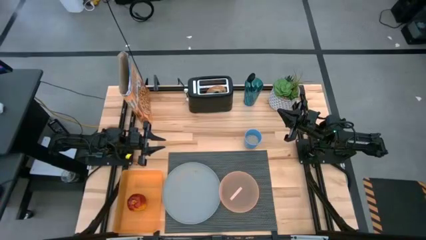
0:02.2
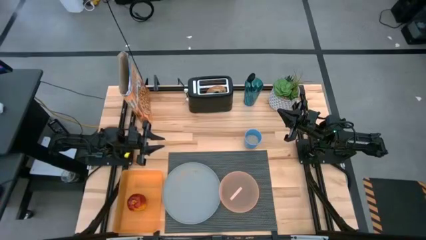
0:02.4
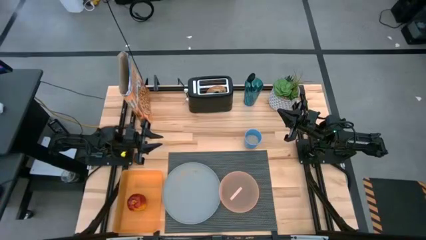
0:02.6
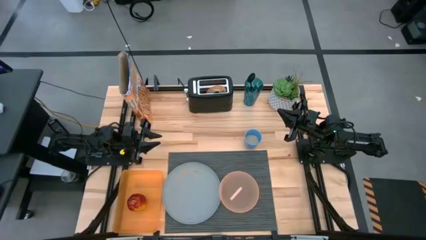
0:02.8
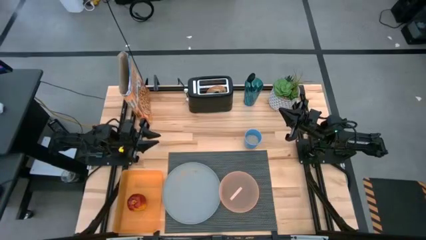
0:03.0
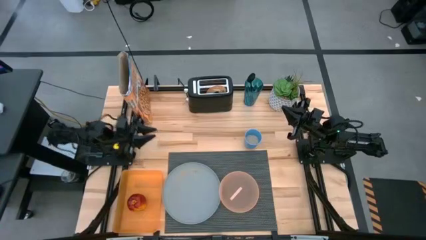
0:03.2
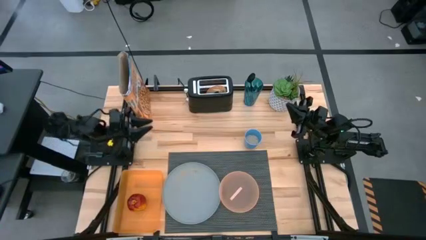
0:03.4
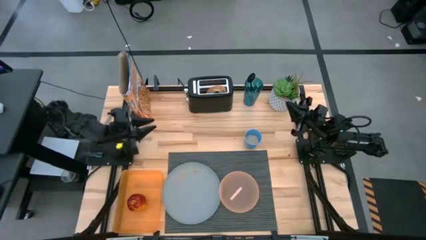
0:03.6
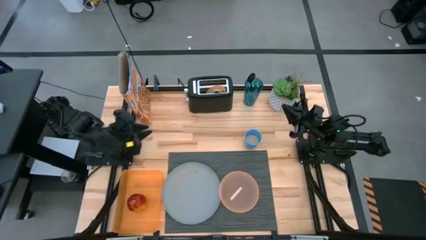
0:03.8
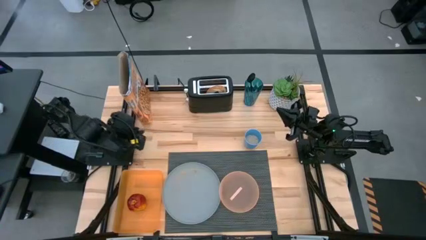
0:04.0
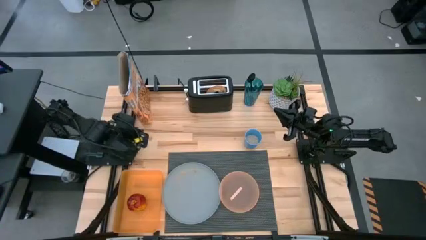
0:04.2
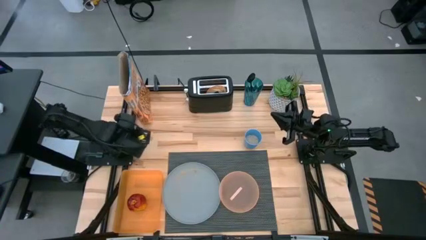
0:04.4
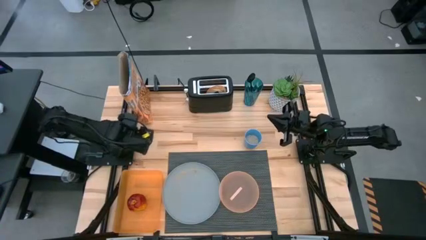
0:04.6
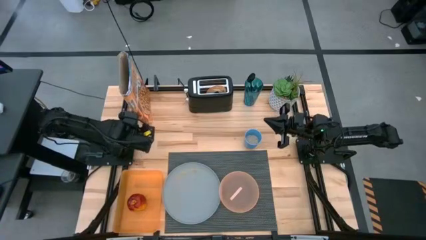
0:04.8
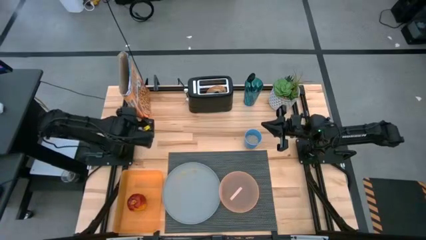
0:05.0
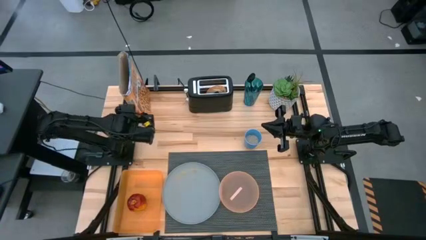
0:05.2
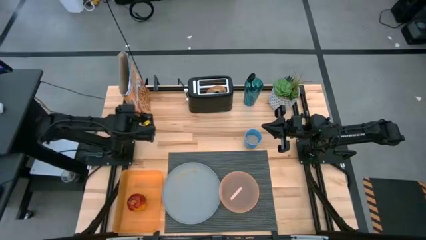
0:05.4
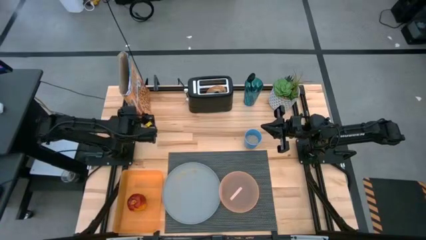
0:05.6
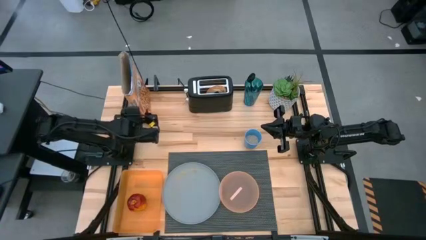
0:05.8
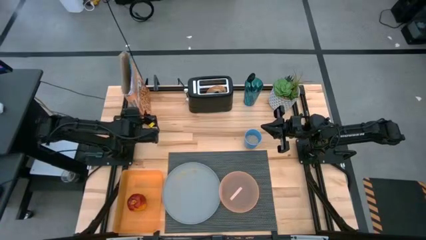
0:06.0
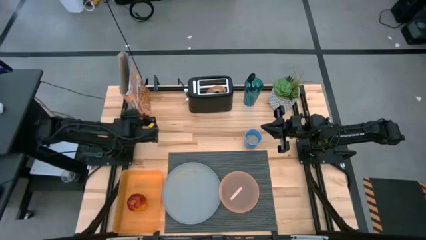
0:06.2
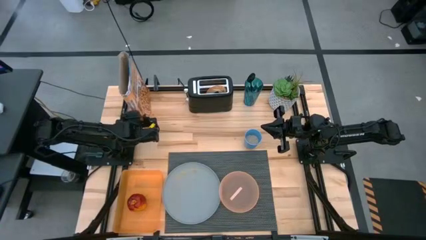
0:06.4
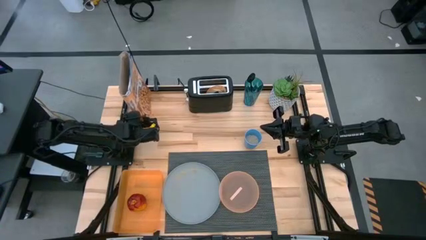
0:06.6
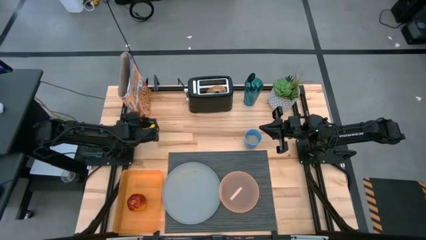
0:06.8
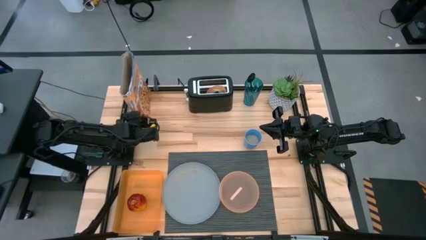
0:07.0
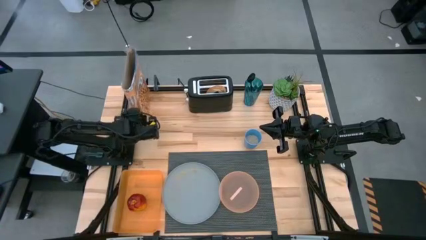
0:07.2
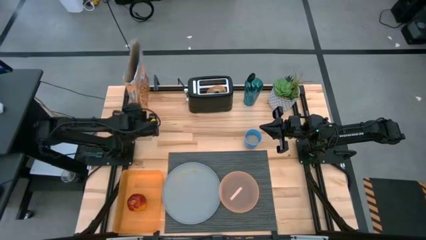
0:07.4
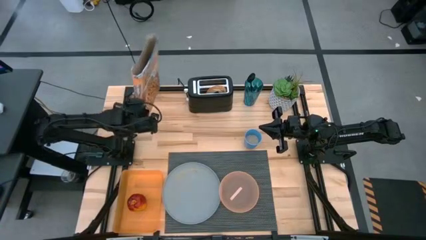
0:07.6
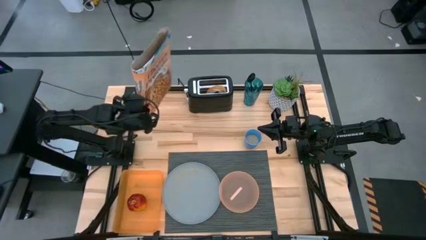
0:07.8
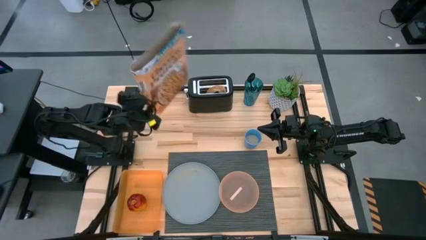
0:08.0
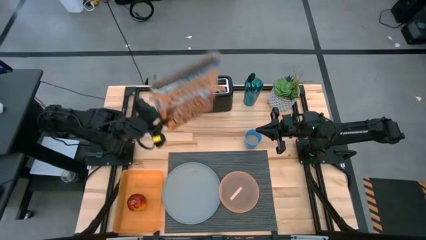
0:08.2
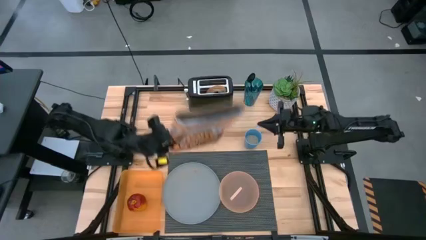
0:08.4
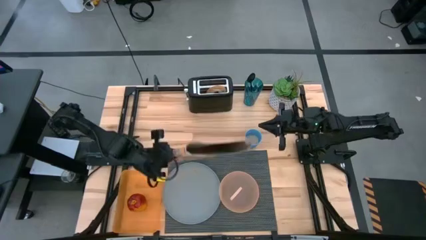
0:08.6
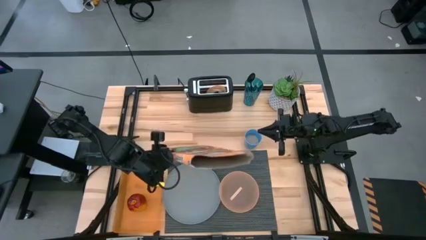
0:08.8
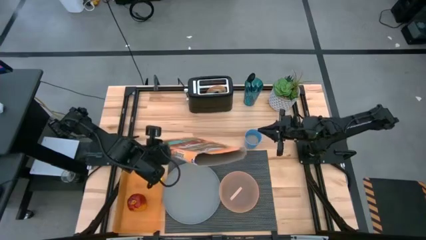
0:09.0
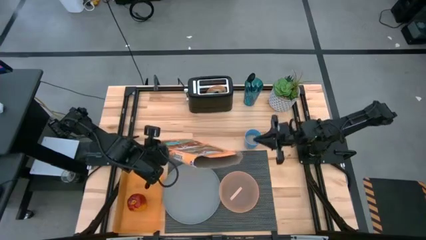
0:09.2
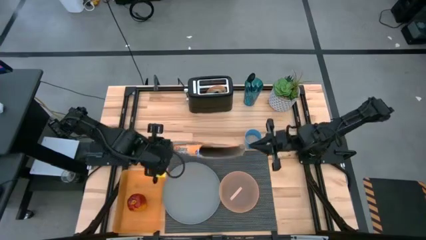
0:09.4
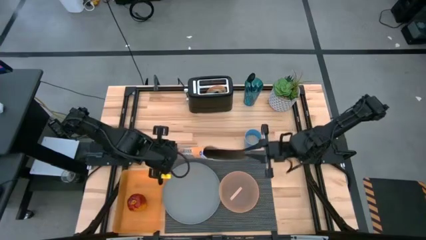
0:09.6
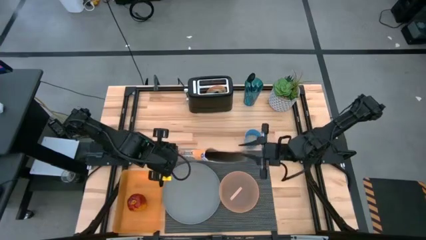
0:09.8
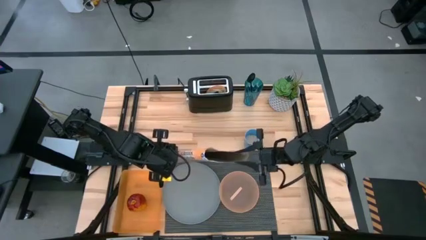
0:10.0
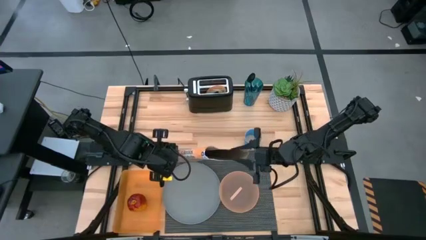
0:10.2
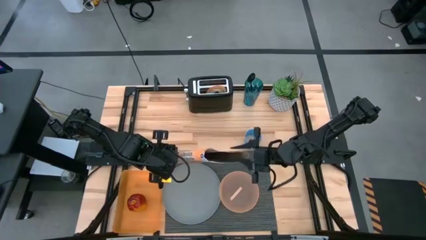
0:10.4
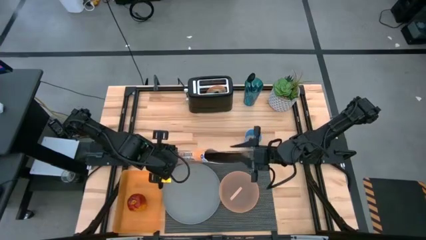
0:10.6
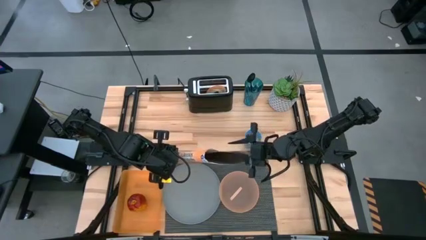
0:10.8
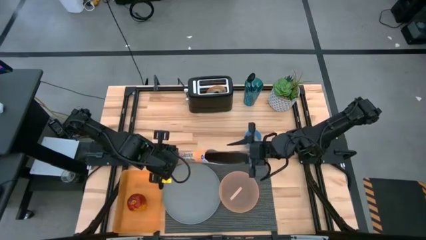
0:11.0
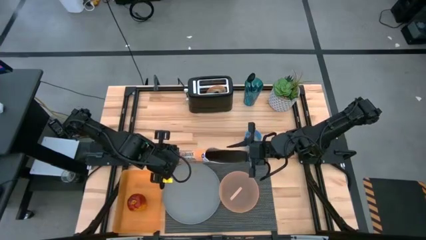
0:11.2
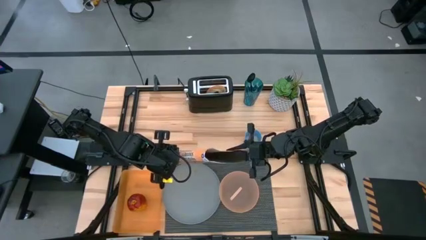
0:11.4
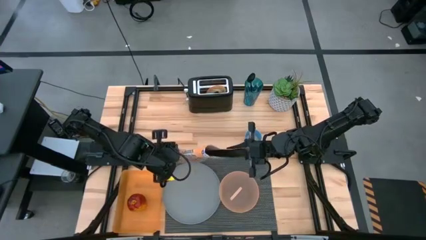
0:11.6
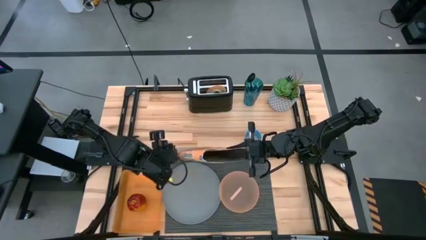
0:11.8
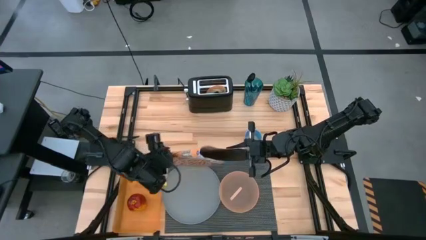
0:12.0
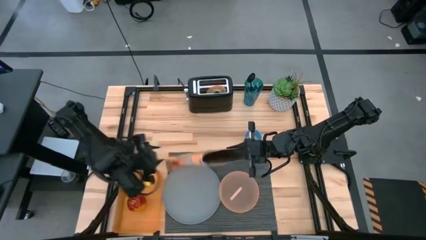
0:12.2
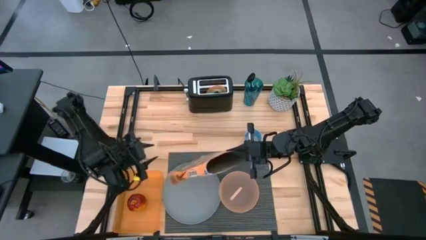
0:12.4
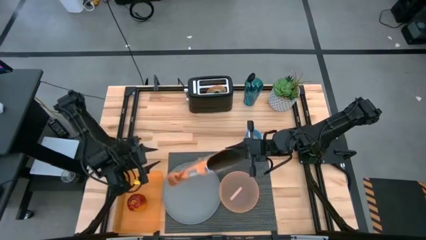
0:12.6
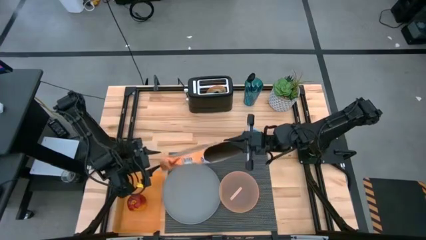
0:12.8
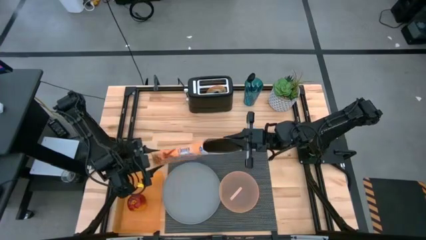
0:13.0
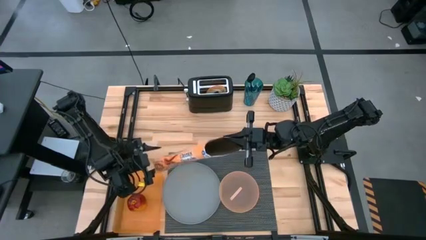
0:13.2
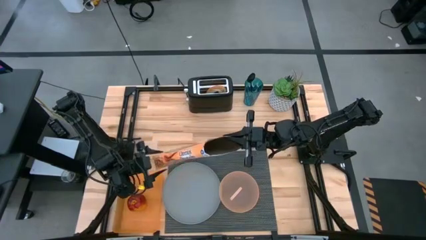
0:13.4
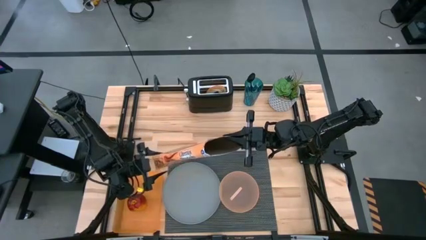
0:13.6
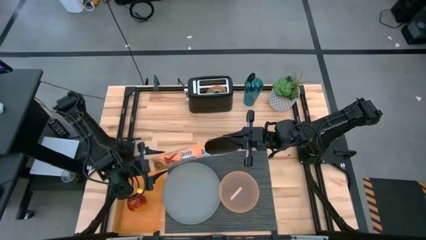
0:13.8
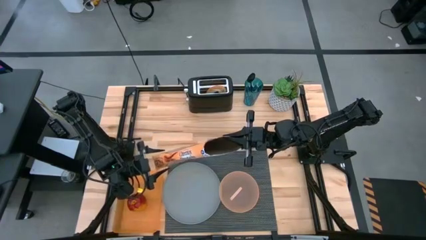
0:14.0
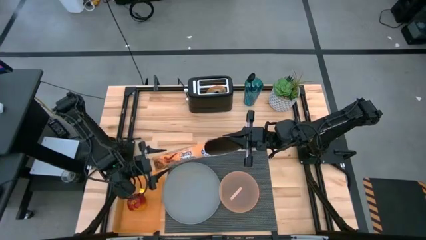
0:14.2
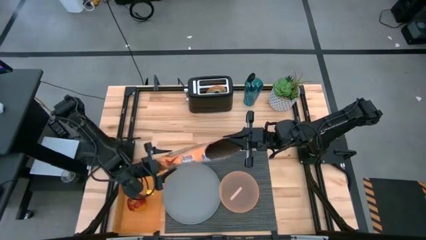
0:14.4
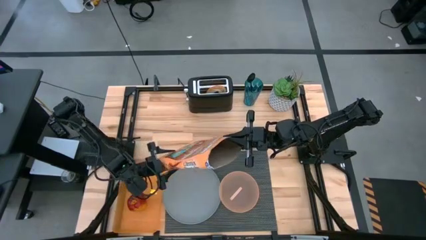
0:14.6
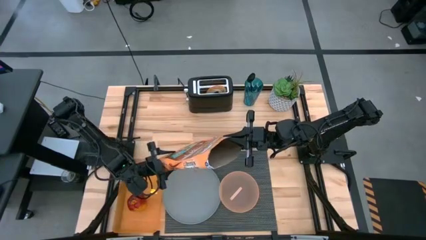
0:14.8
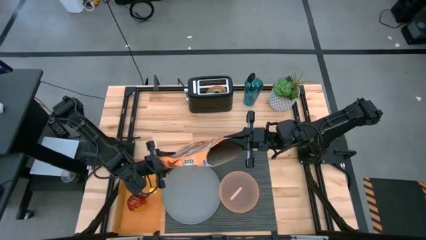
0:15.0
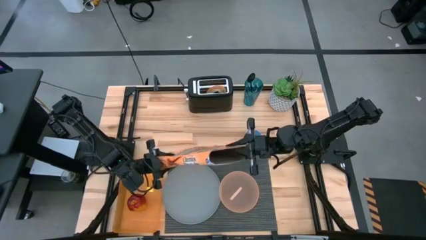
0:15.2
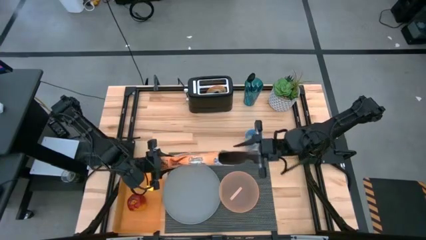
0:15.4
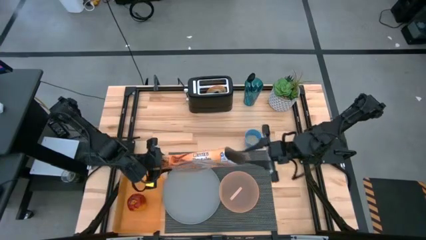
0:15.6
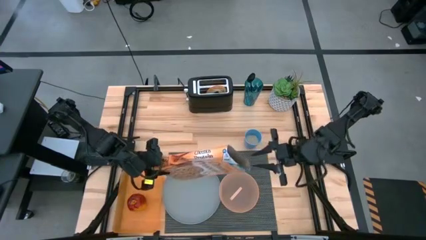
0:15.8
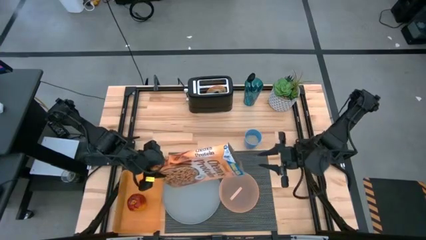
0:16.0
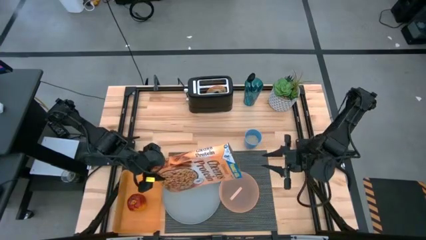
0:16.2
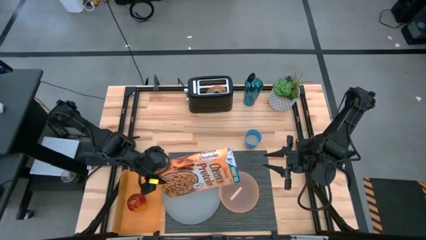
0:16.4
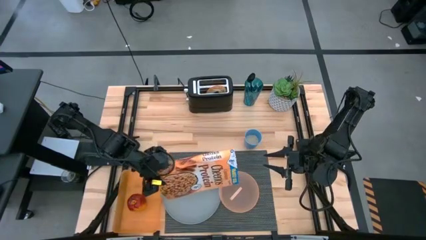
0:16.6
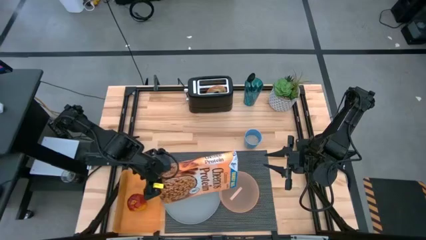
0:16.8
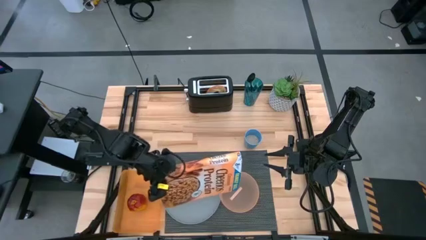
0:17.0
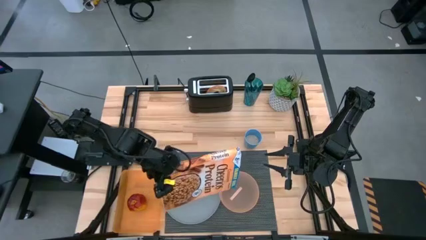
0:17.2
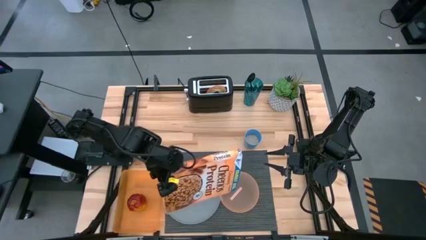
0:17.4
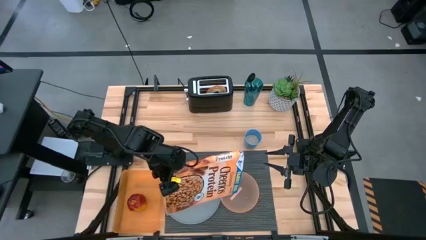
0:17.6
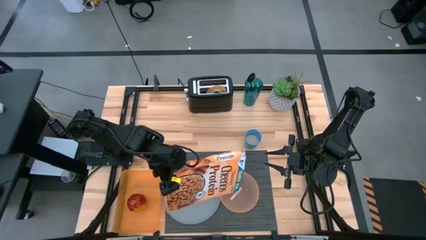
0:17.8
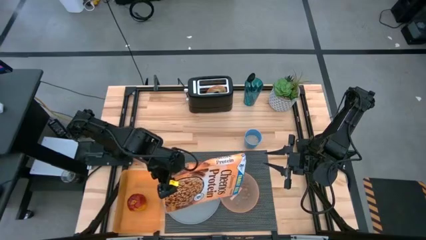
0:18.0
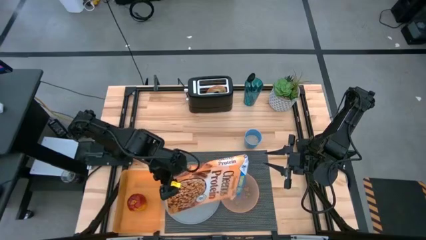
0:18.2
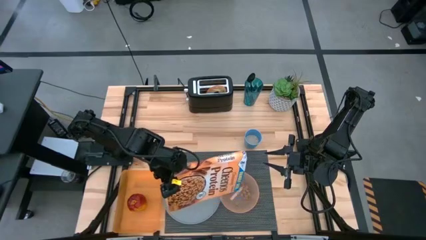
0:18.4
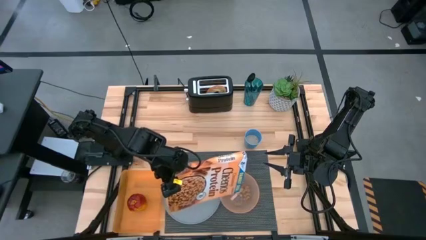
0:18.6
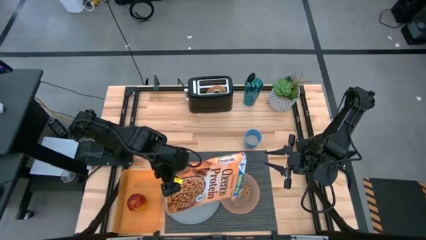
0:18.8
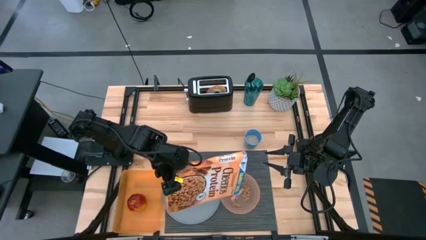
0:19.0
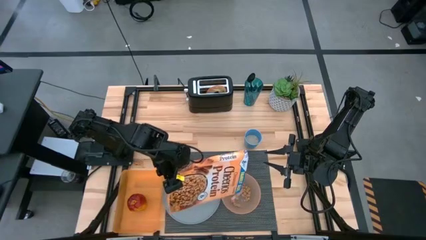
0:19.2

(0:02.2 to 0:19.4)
Task: Arrange a breakfast setting
Pour the cereal from the cereal box into the pink bowl
